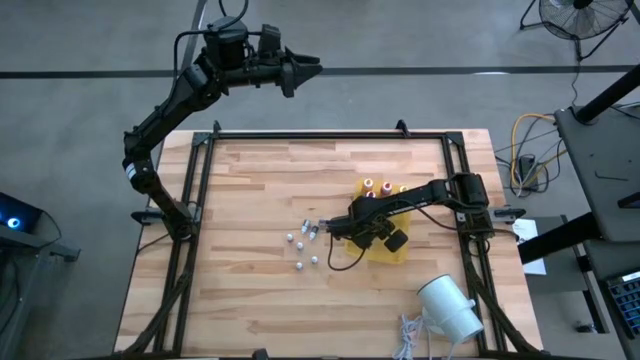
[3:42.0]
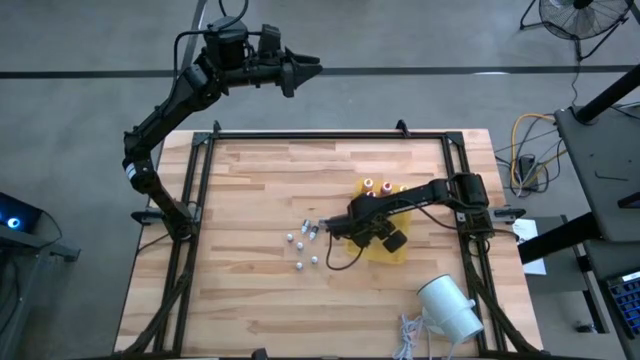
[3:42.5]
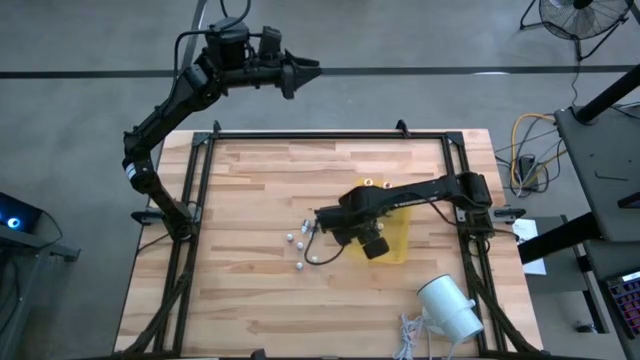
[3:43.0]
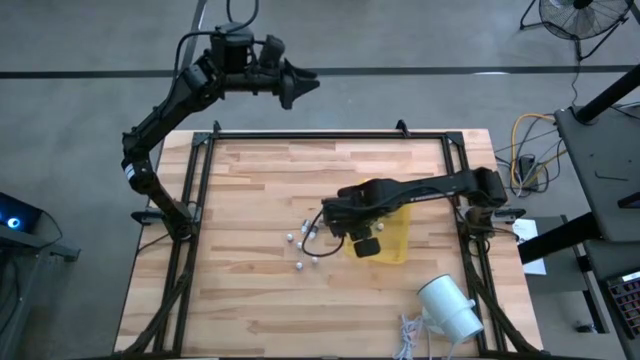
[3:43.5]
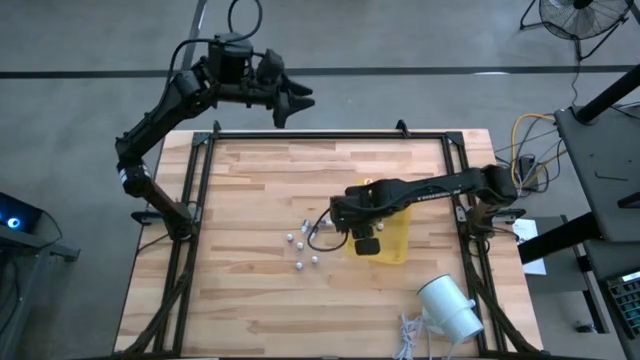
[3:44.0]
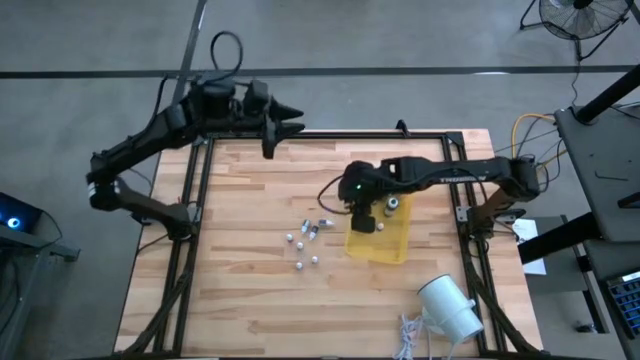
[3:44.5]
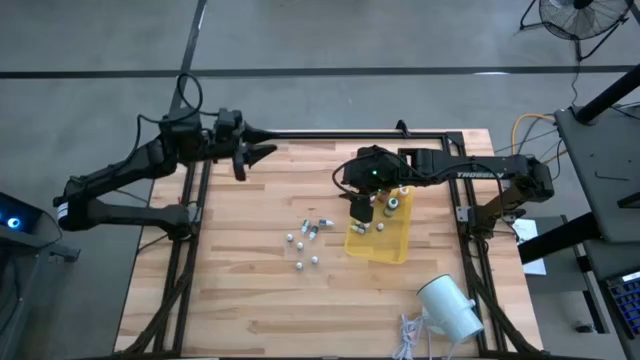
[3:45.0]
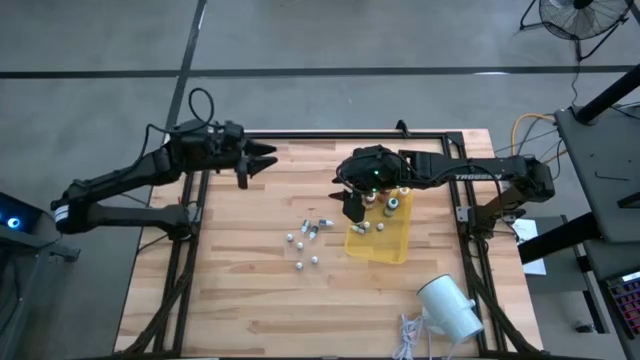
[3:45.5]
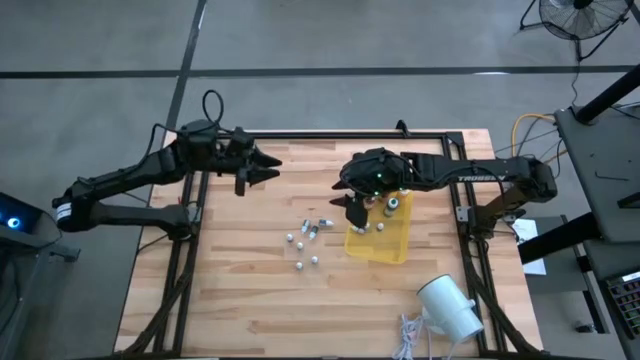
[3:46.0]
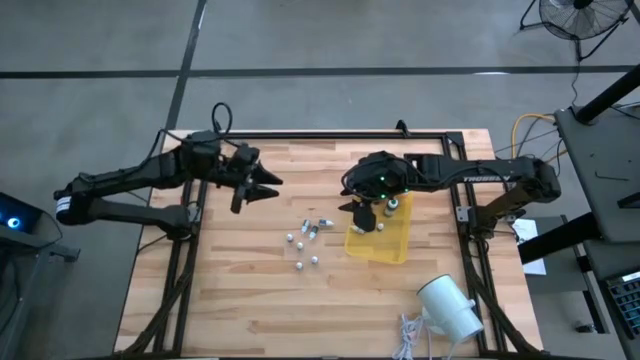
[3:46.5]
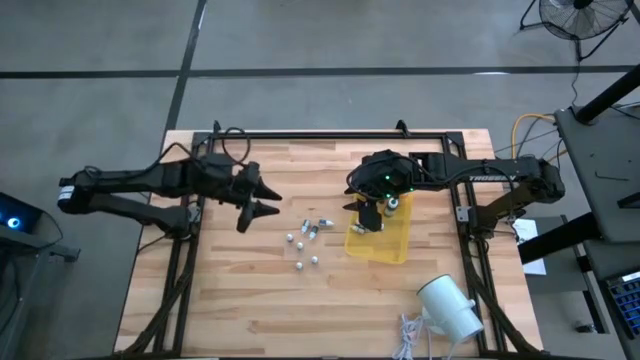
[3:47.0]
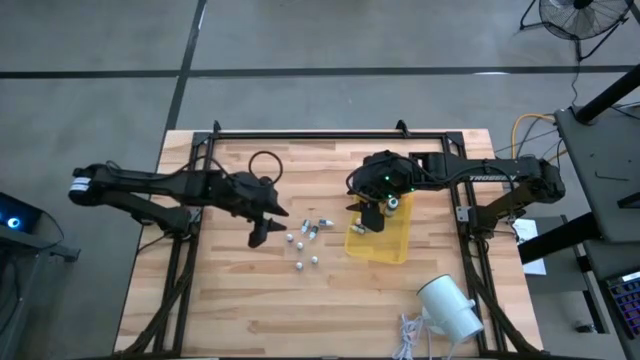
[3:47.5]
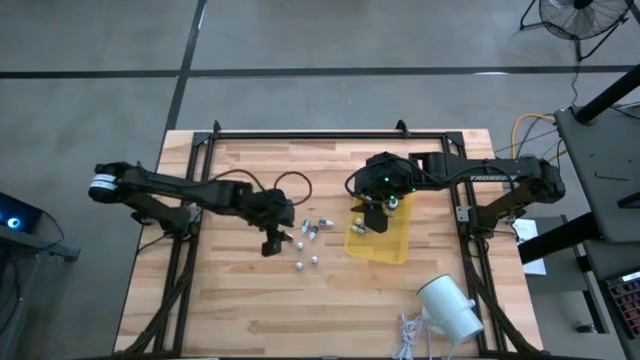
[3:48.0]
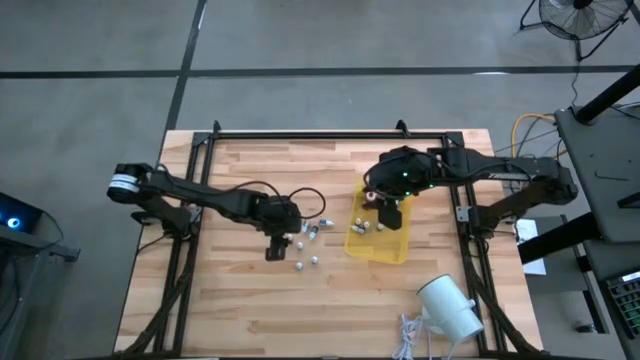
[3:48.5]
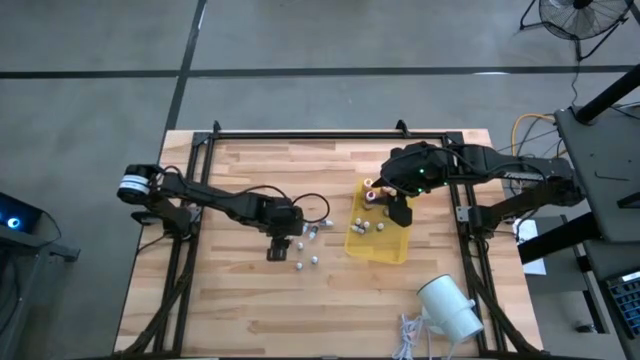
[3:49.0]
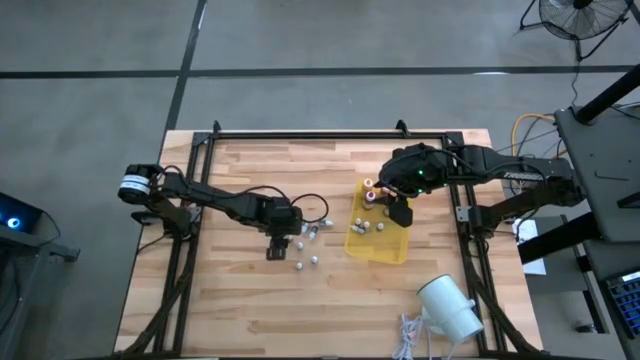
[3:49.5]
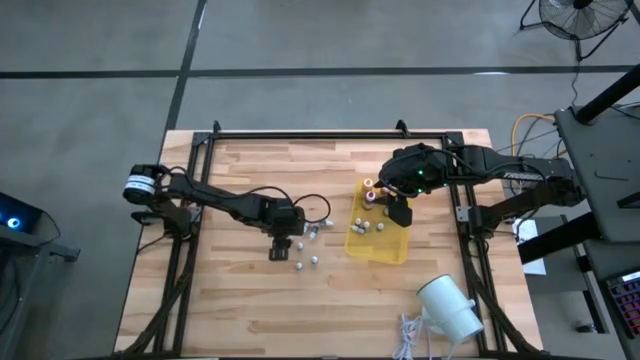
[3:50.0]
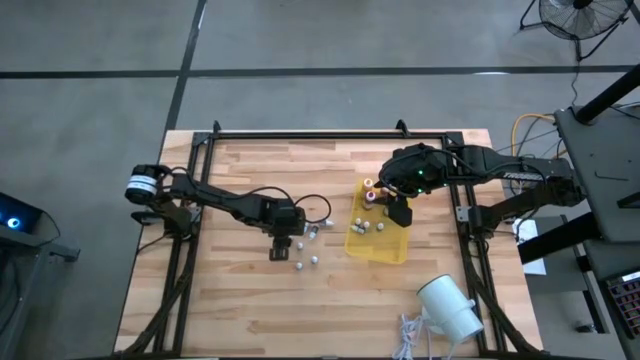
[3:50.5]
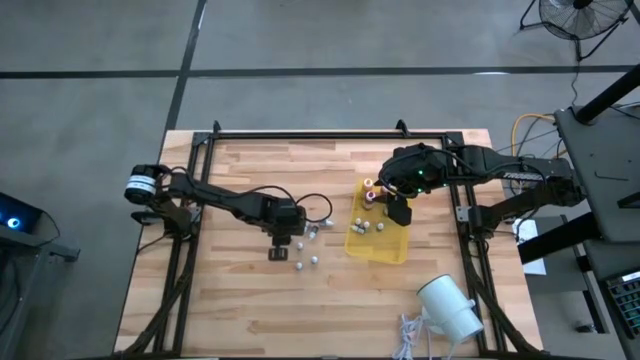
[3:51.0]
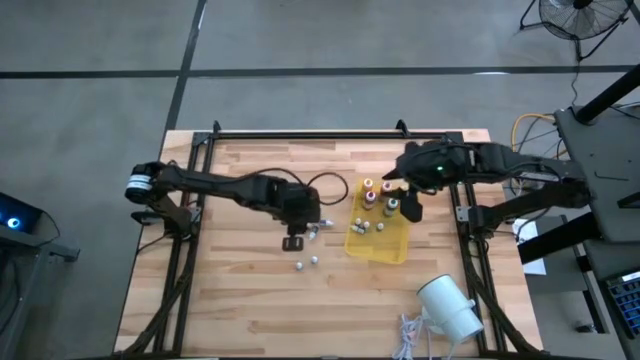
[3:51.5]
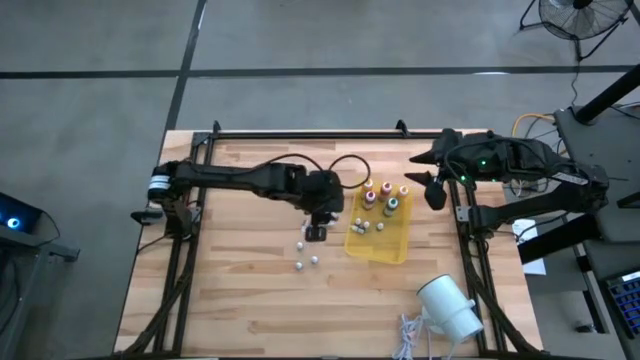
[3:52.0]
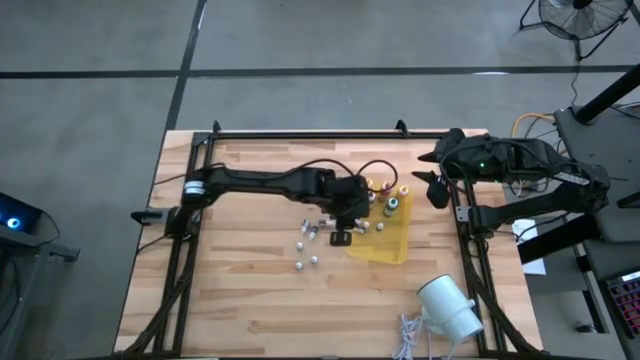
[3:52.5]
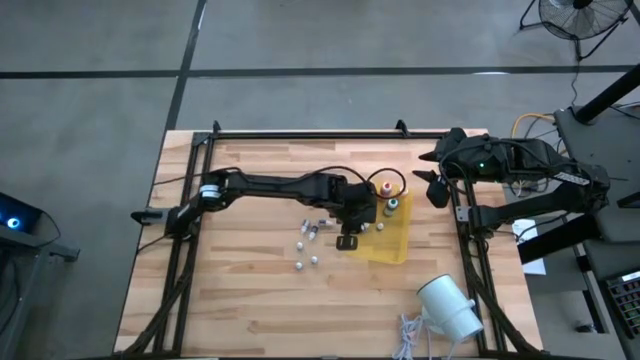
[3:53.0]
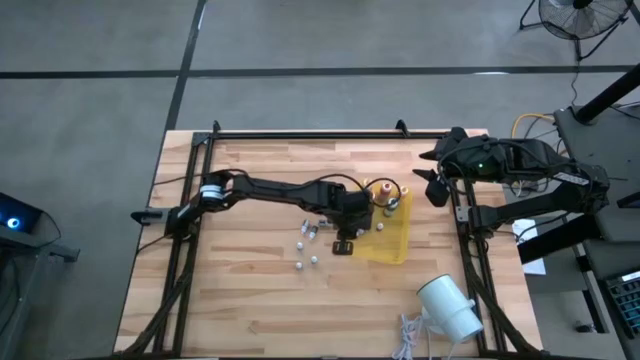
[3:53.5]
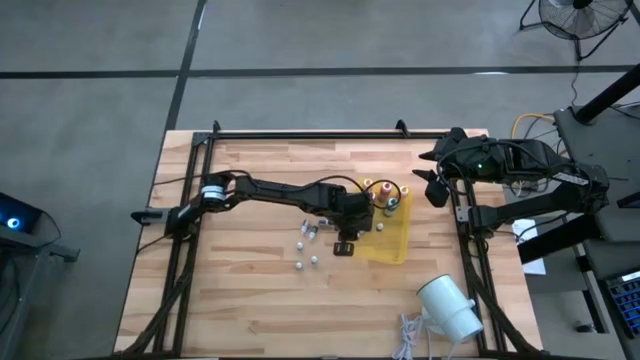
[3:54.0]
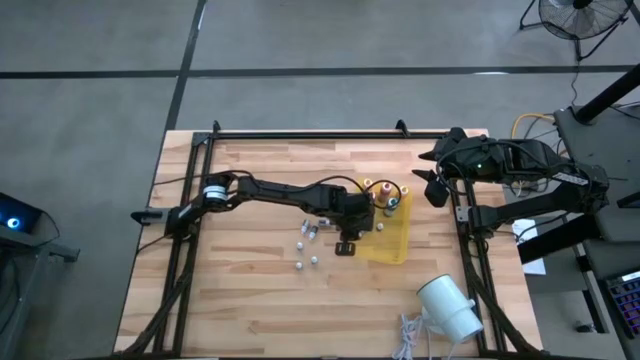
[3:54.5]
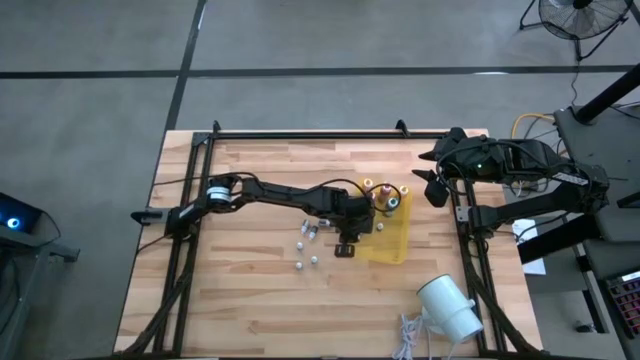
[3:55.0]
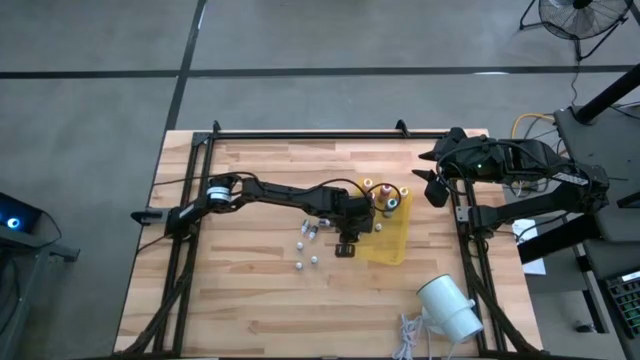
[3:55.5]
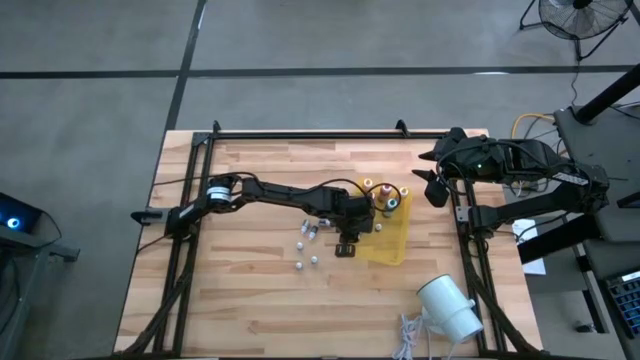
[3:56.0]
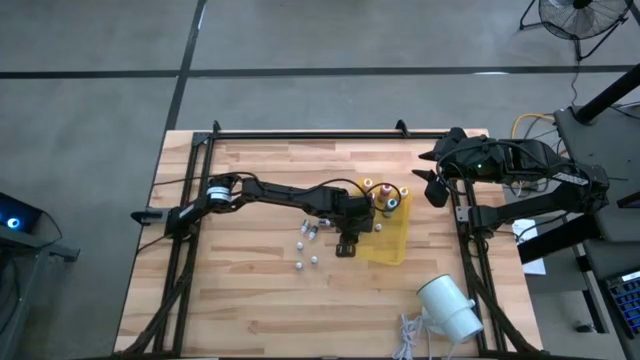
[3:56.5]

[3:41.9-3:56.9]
Task: Pick & Place food coloring
Put the small pink food coloring bottle into the yellow bin

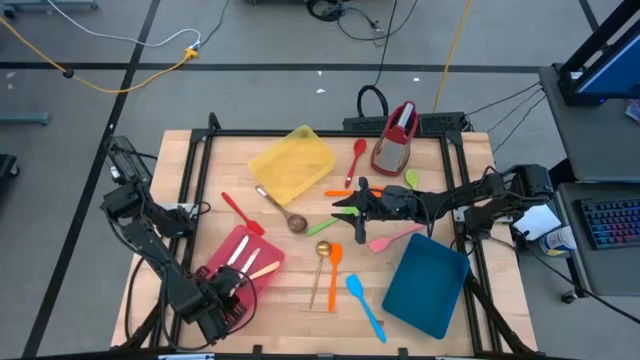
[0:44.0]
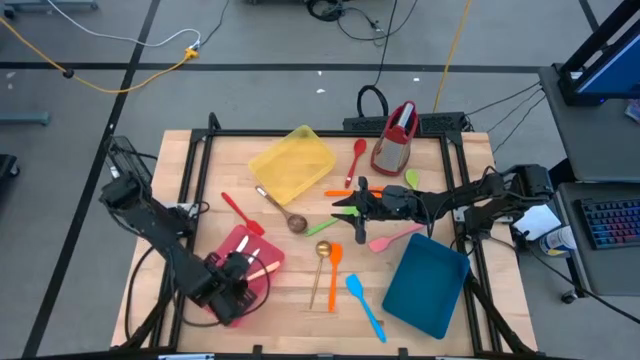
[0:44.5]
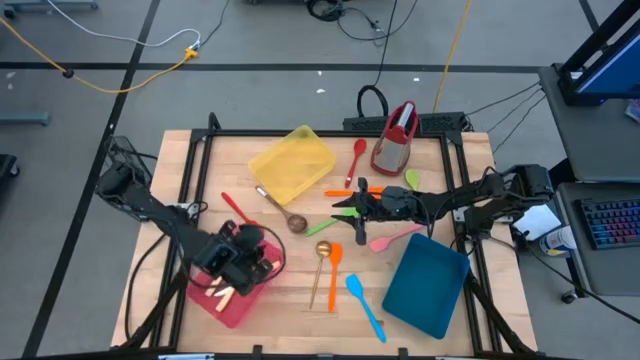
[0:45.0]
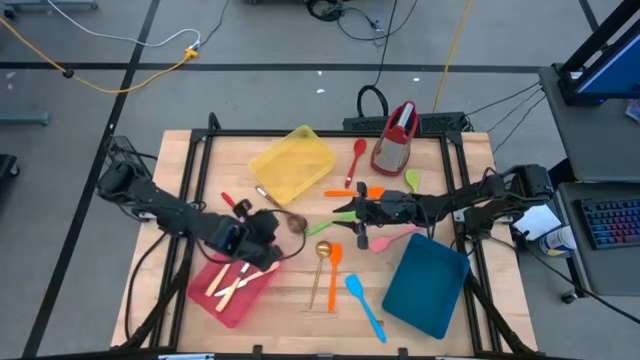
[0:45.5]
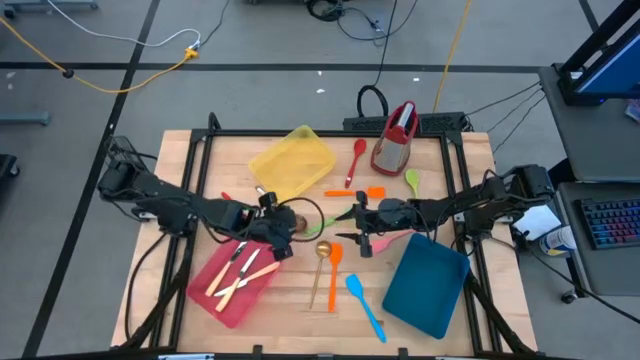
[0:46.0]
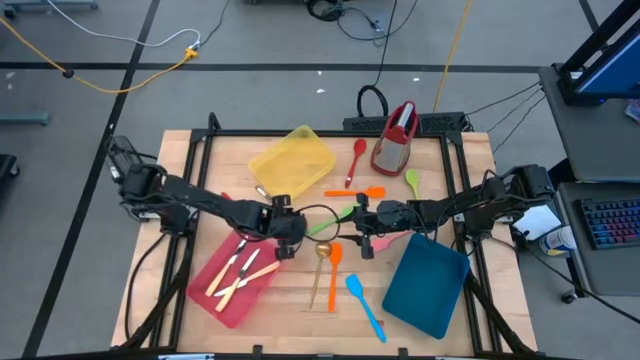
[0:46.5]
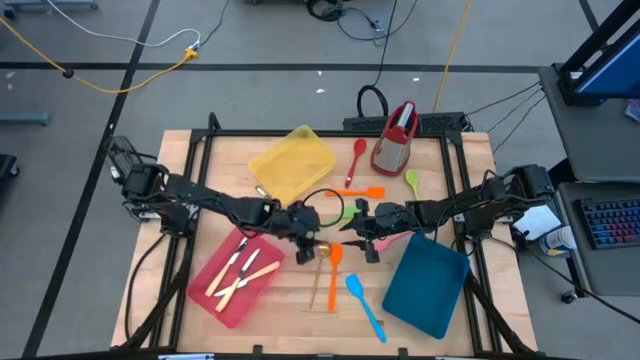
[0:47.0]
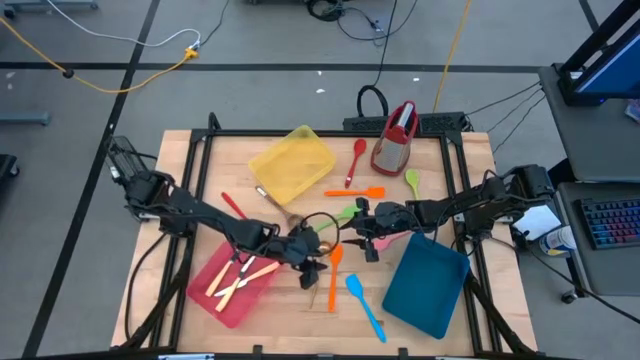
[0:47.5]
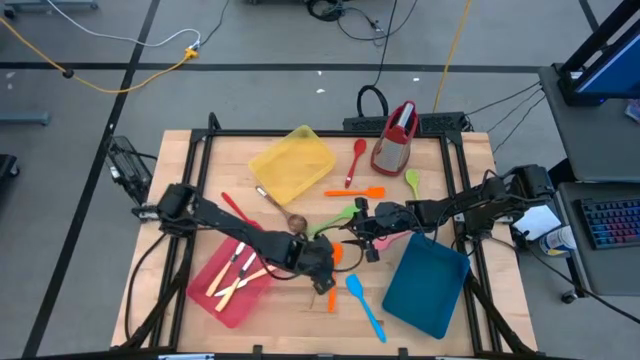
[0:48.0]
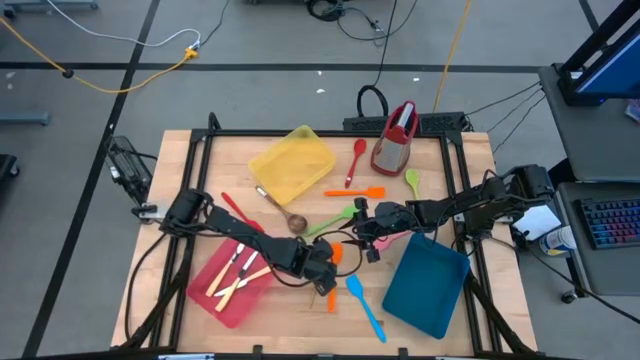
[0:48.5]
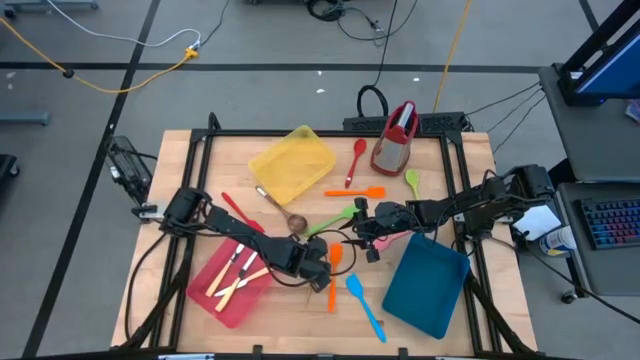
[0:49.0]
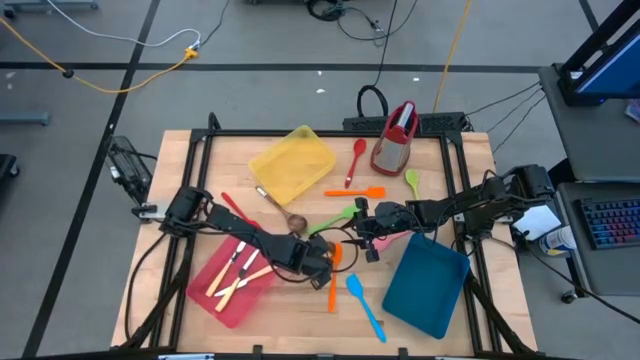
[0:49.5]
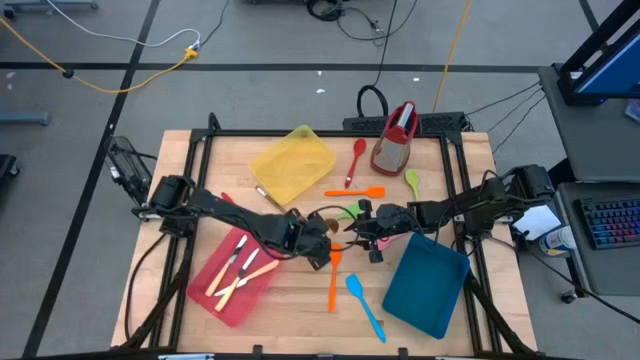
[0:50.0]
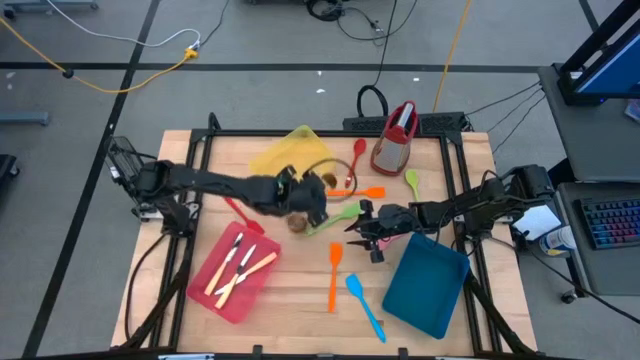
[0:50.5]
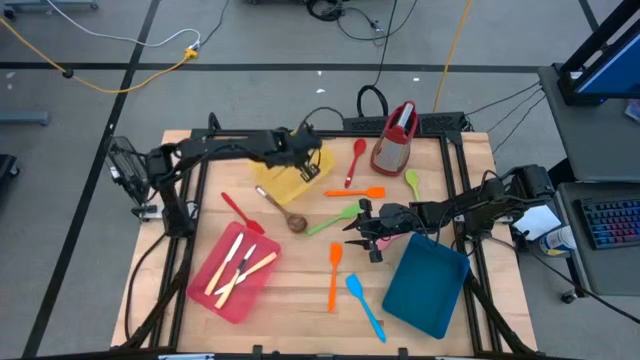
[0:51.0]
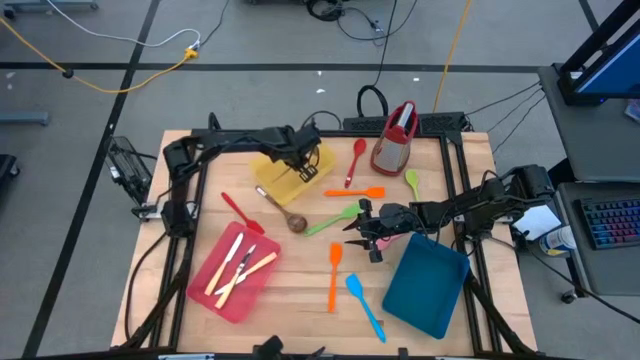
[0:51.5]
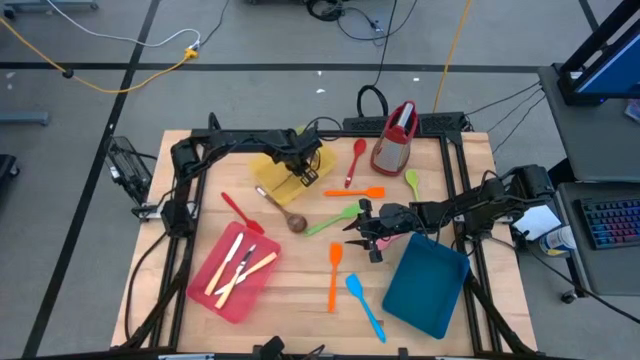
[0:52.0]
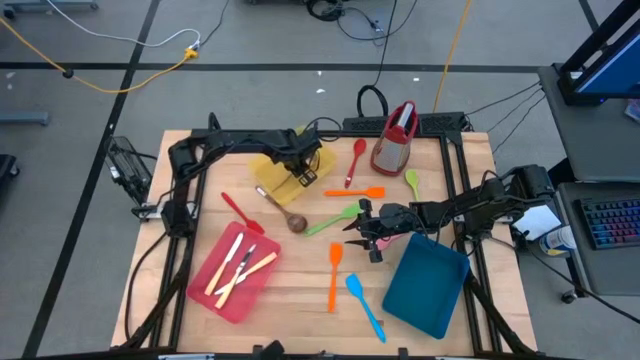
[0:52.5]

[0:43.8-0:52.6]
Task: Pick & Place Kitchen Items
Put the gold serving spoon into the yellow bin
